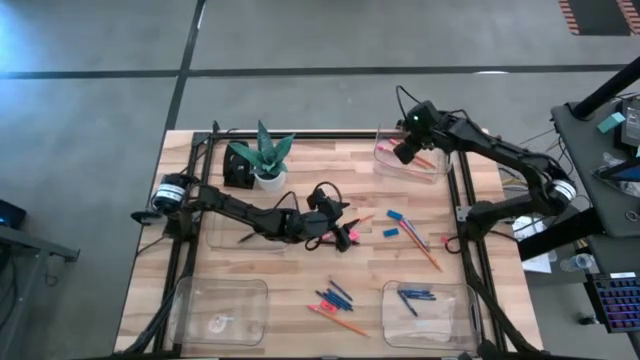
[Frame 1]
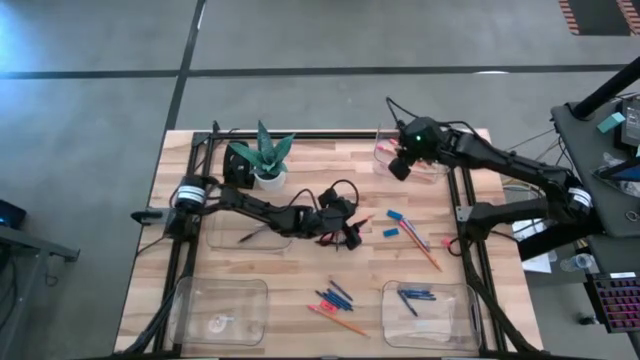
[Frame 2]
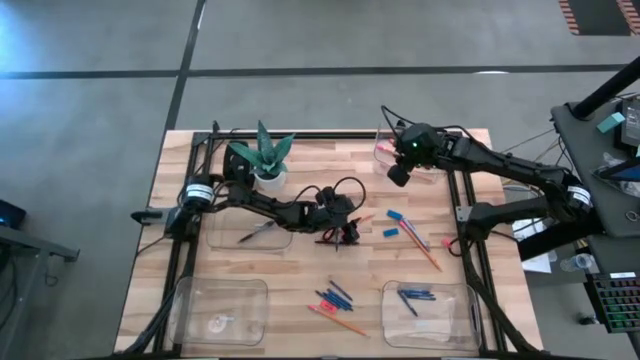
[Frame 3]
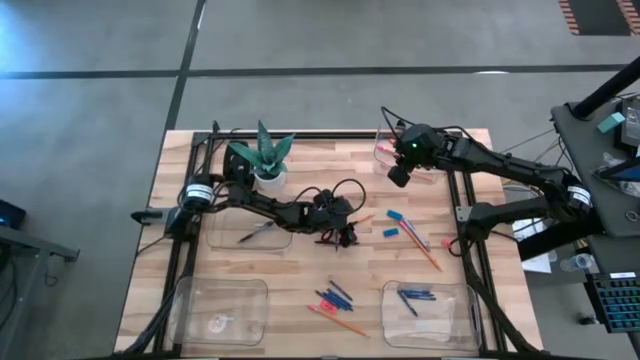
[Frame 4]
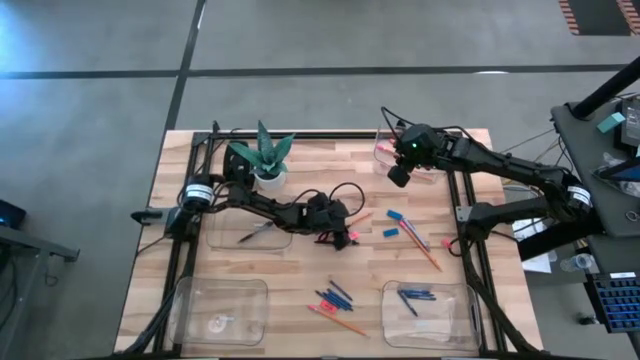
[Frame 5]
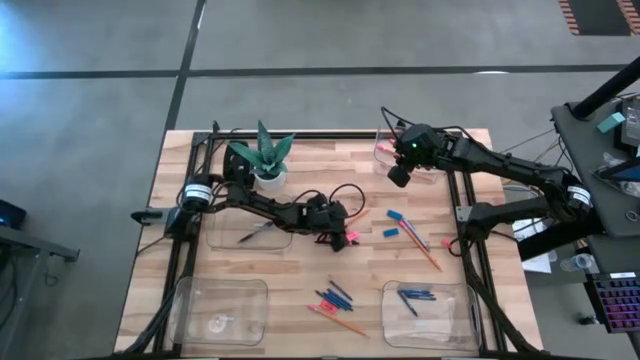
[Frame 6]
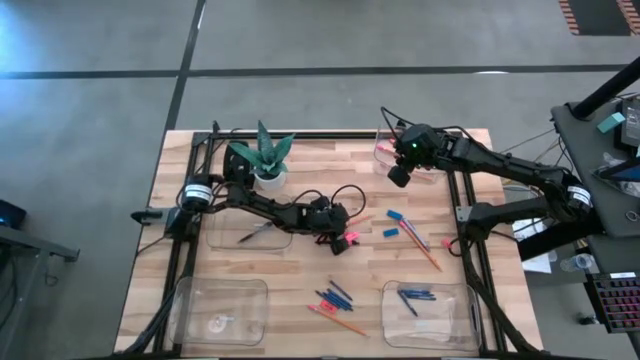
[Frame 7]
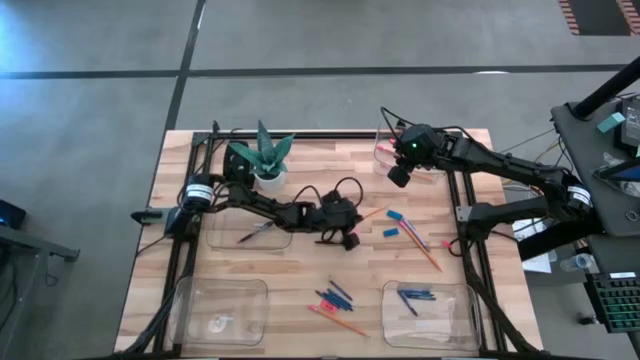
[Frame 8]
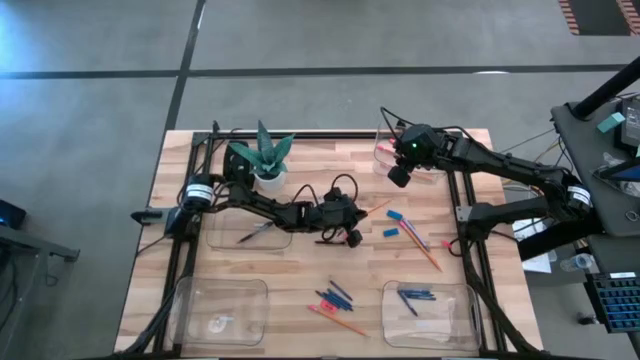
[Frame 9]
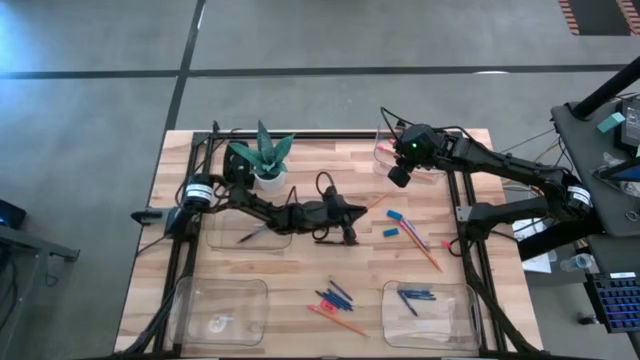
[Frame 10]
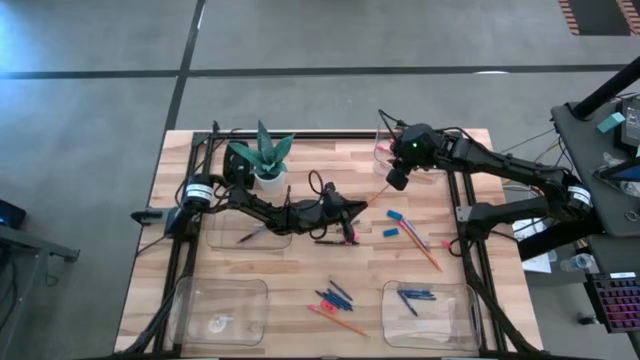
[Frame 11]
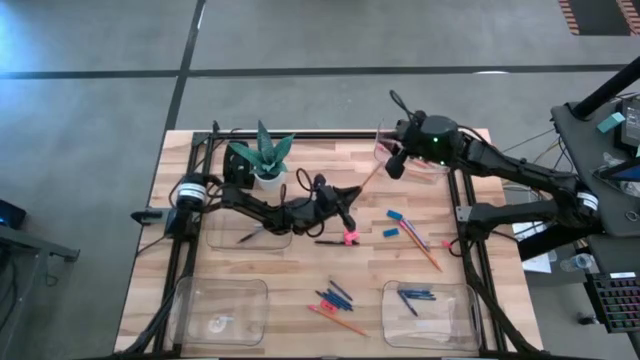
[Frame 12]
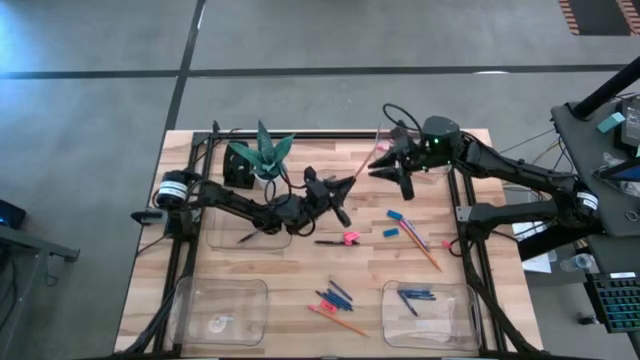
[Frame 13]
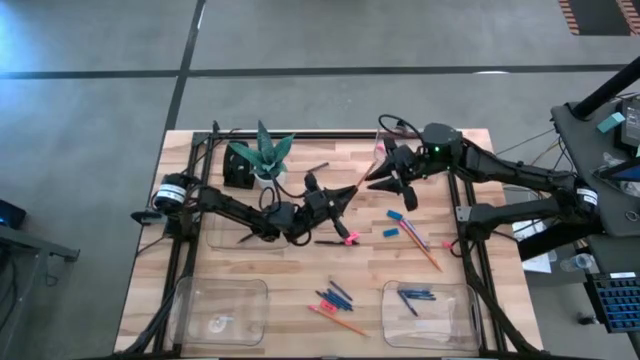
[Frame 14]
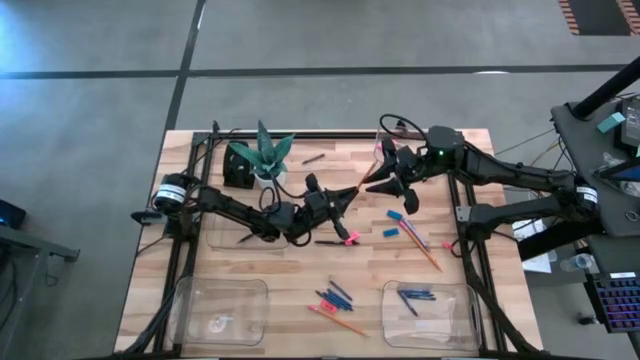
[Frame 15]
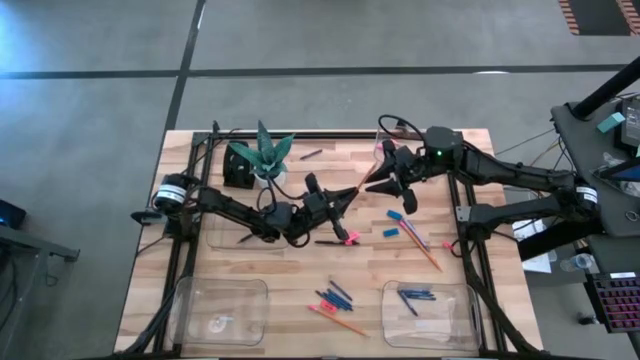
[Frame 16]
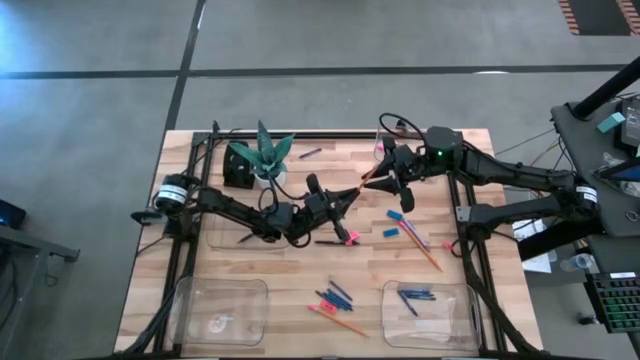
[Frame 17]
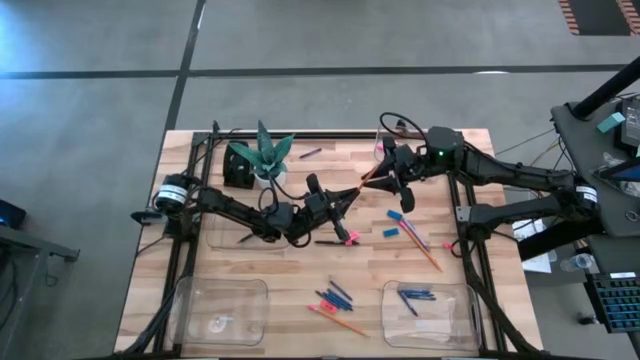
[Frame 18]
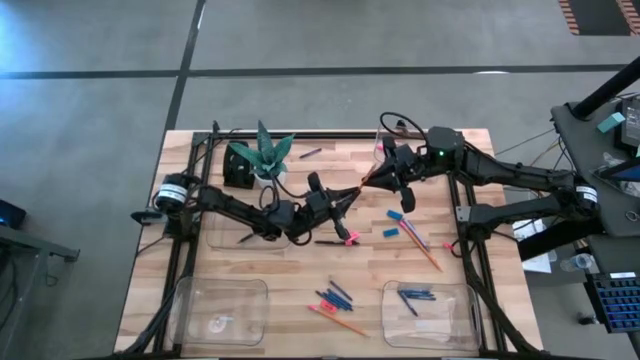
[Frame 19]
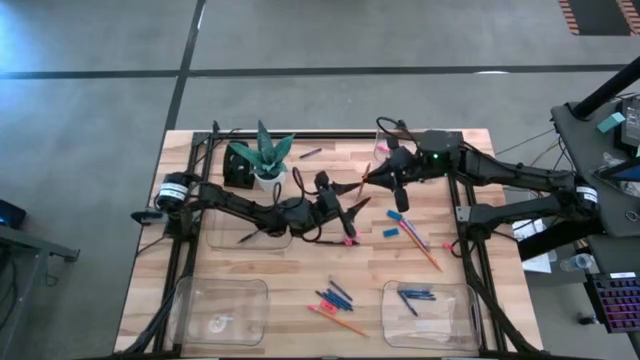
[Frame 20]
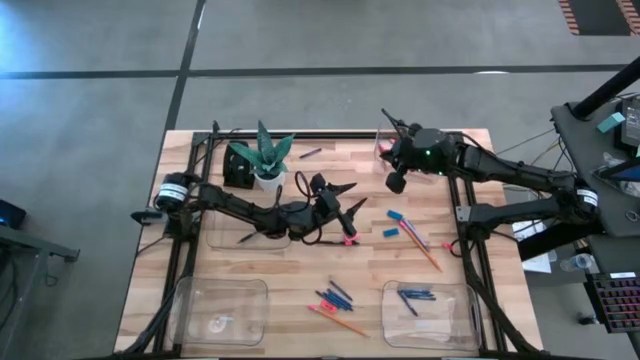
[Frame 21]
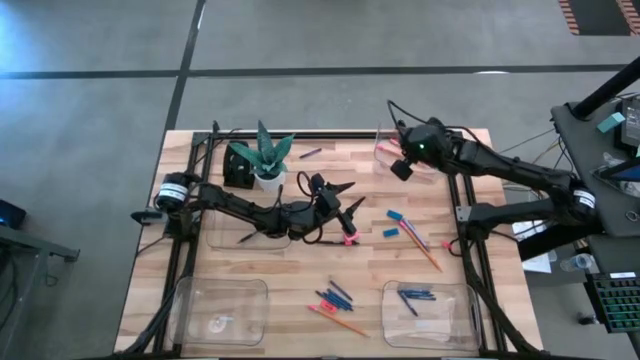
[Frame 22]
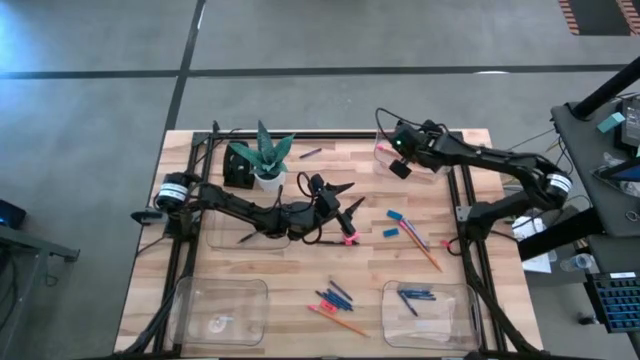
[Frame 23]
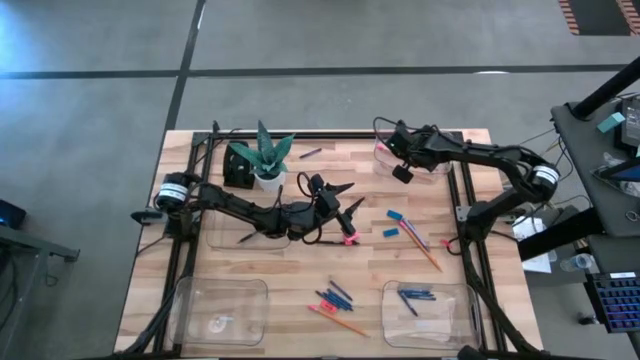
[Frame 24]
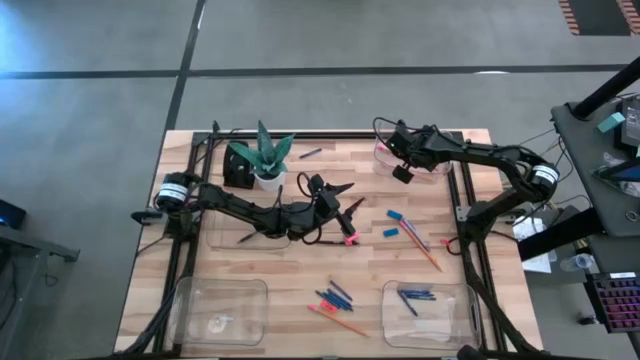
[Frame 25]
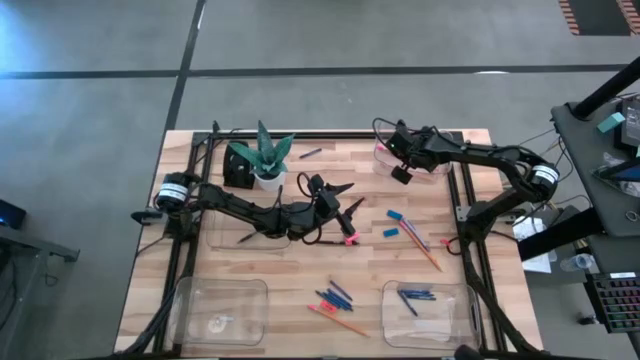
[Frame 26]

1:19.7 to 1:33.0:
Task: Sort crayons/erasers/pens/pencils in bins
Put the orange pencil into the top right transparent bin

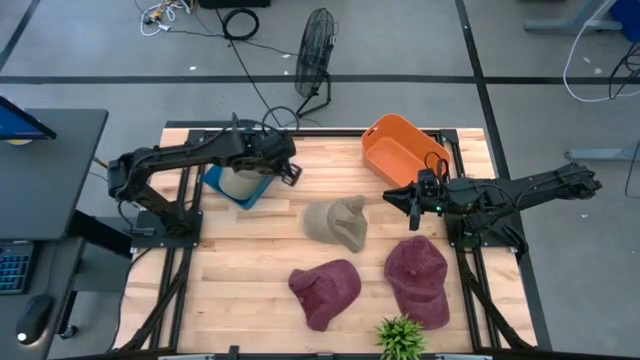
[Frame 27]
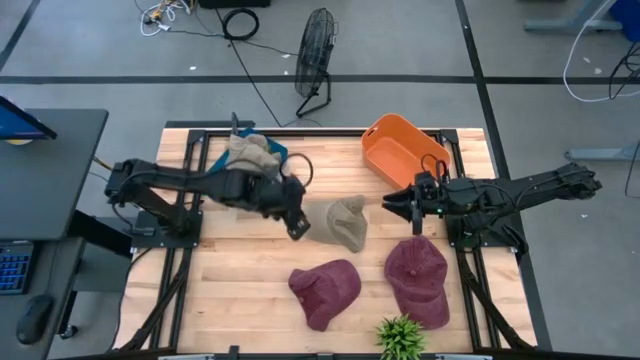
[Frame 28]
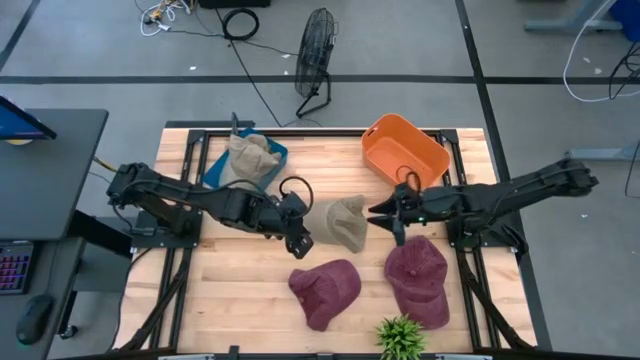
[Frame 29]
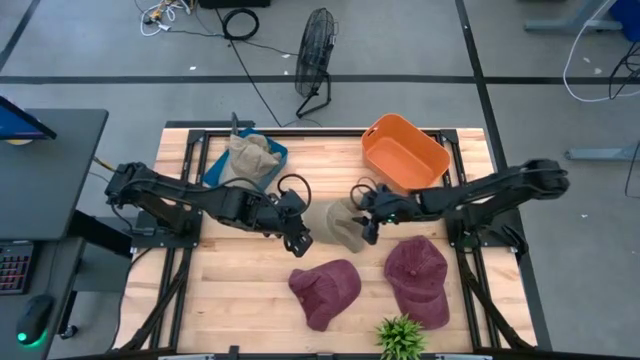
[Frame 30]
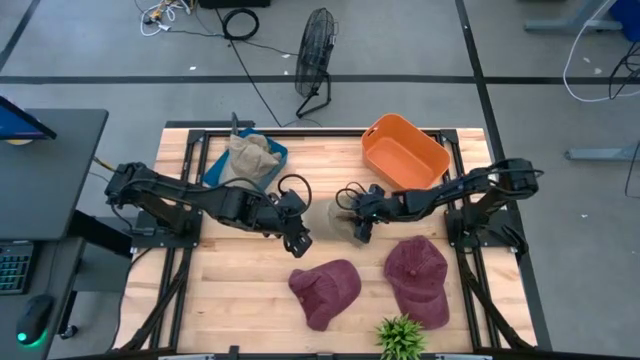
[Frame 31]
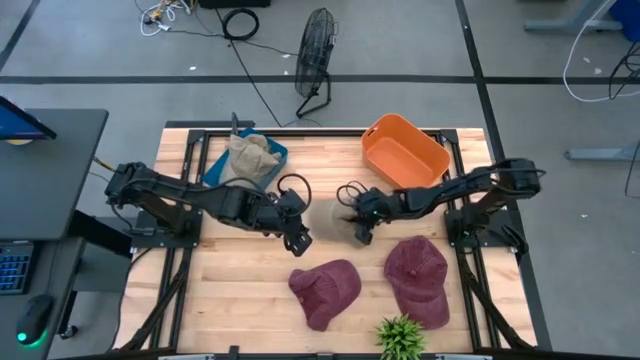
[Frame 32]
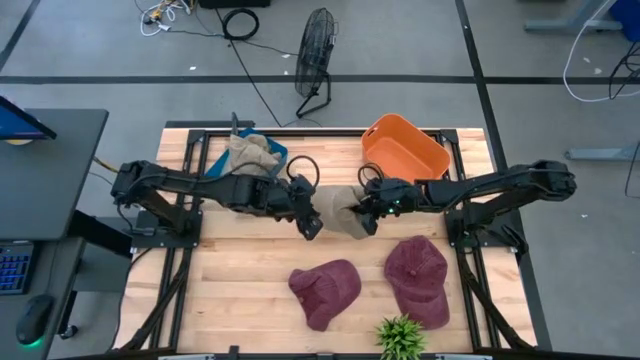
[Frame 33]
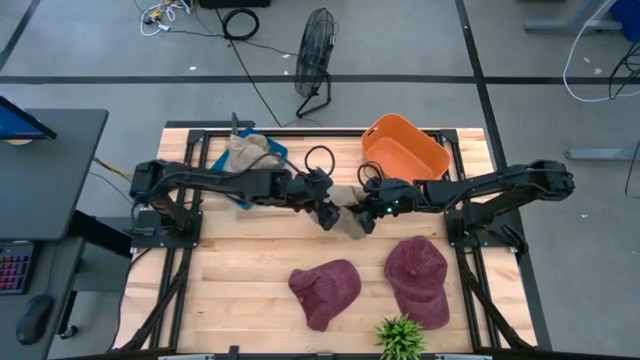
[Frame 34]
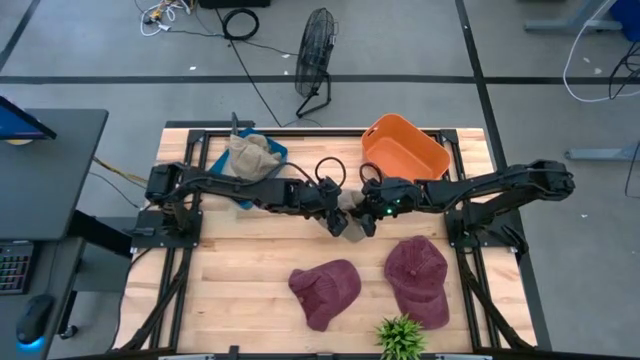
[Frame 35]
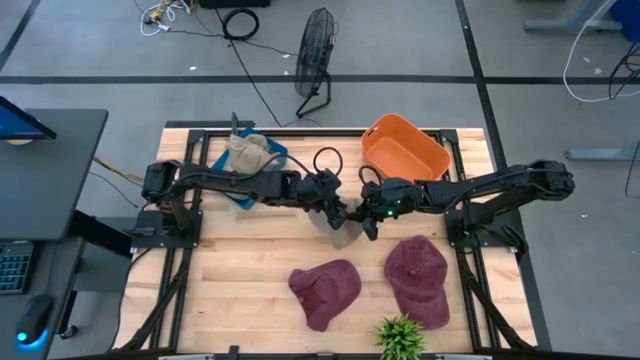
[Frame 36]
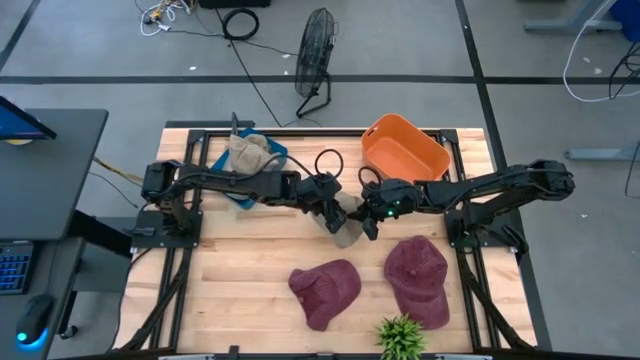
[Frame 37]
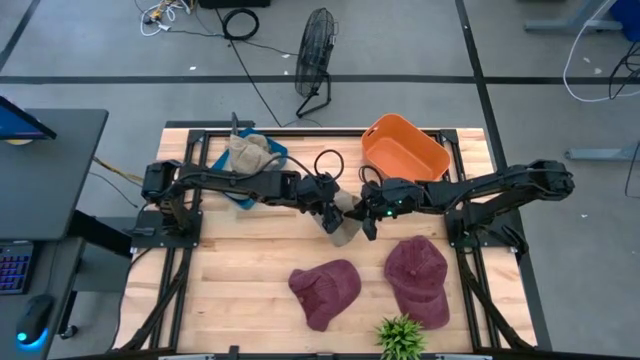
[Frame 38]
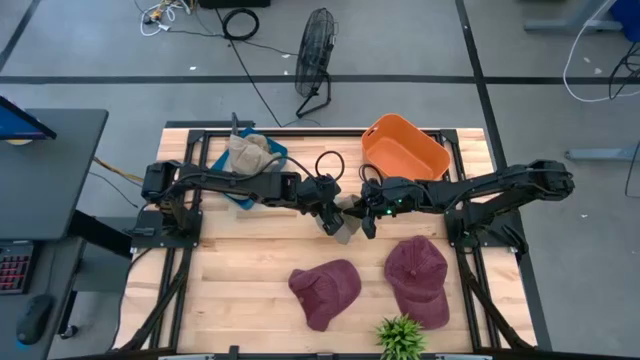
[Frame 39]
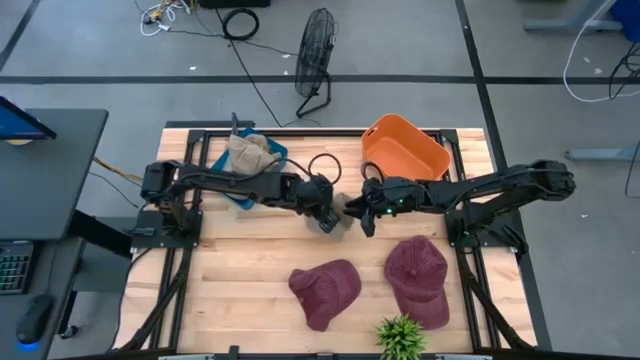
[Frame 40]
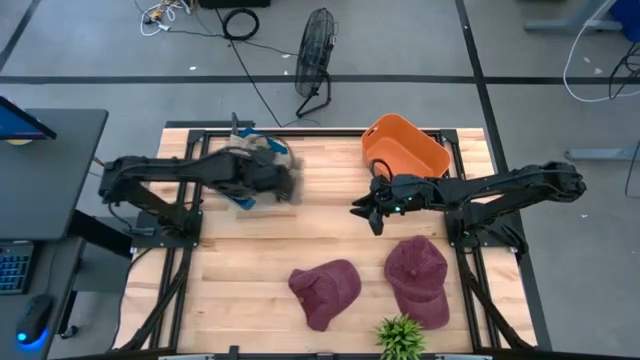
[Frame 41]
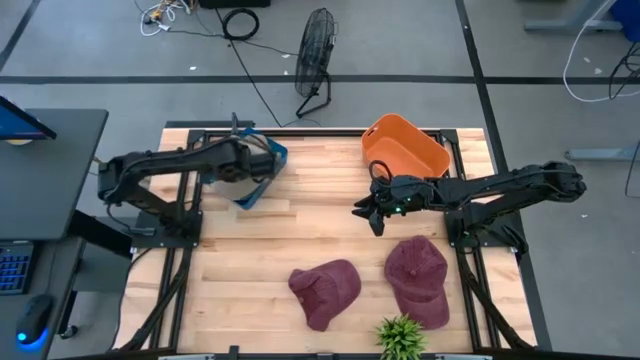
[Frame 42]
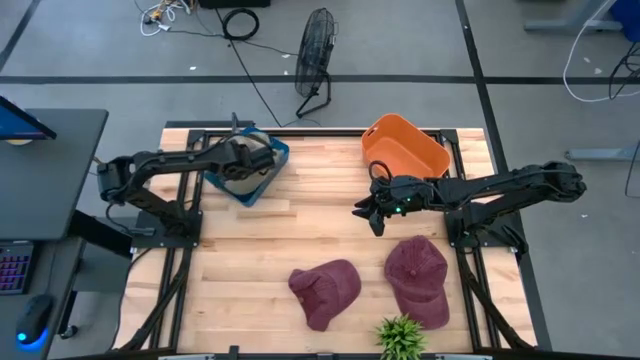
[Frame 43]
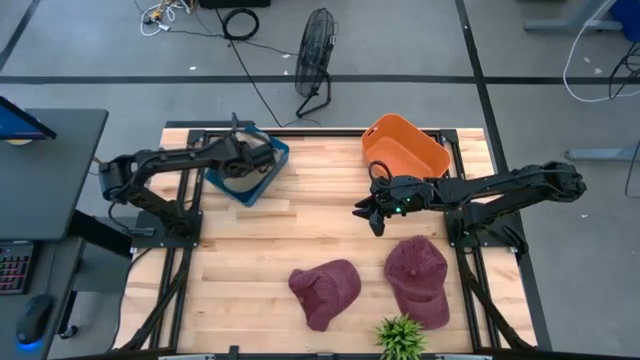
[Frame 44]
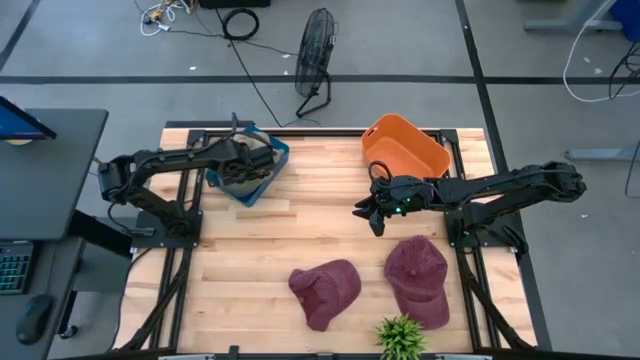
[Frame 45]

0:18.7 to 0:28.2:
Task: Pick & Place hat
Put the brown cap into the blue bin
